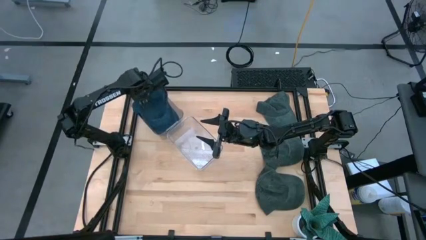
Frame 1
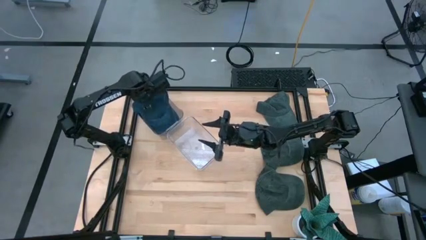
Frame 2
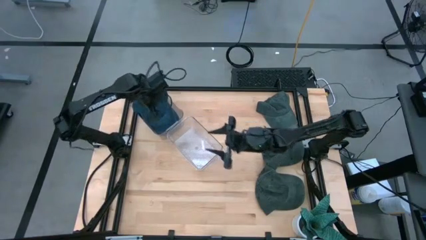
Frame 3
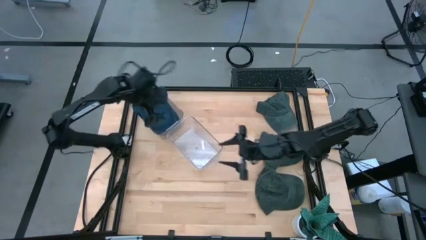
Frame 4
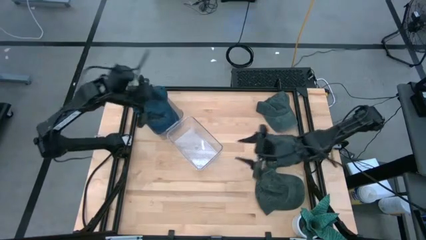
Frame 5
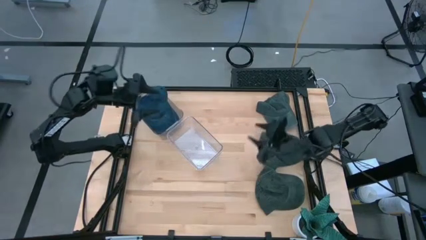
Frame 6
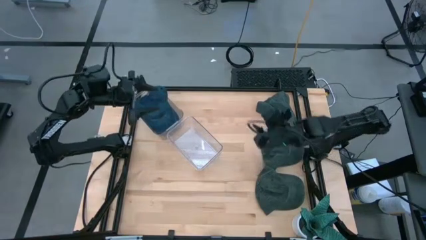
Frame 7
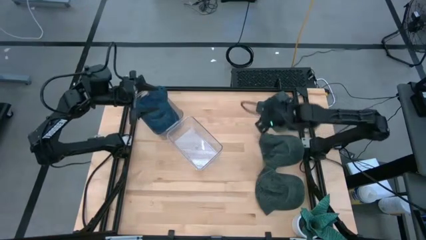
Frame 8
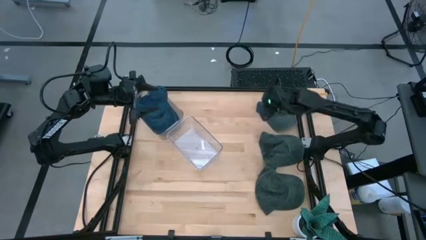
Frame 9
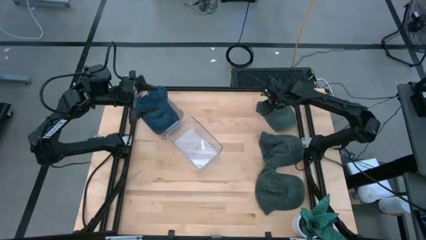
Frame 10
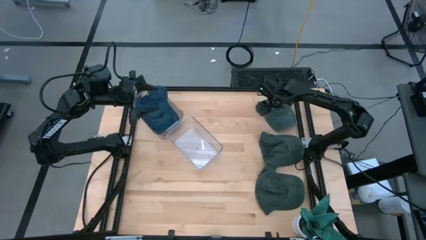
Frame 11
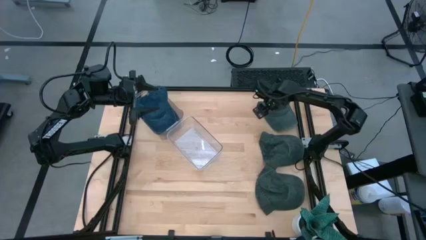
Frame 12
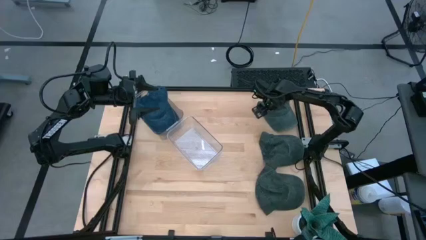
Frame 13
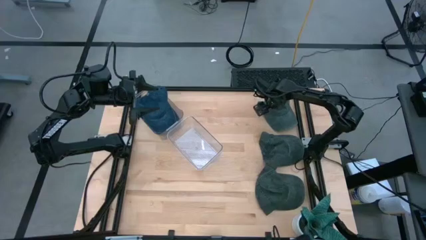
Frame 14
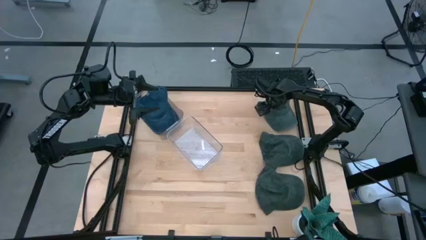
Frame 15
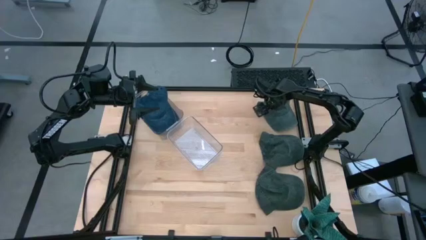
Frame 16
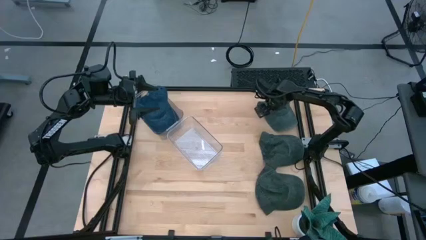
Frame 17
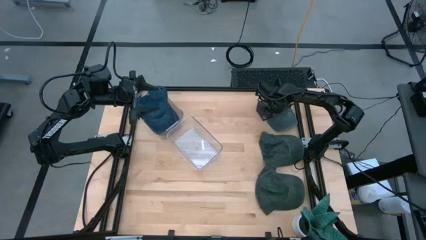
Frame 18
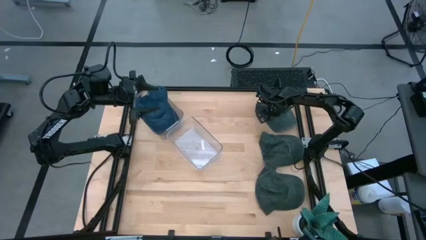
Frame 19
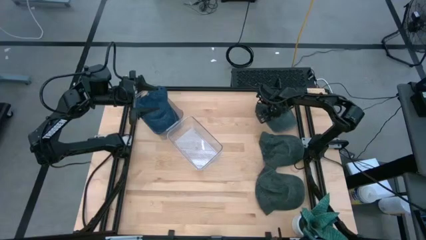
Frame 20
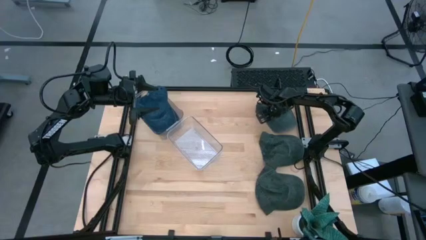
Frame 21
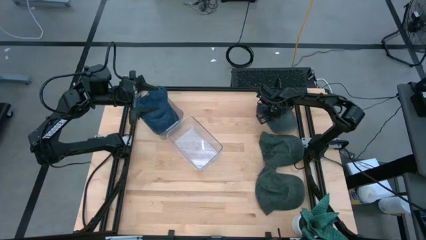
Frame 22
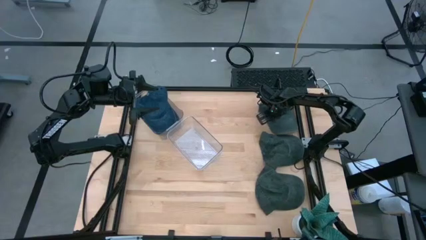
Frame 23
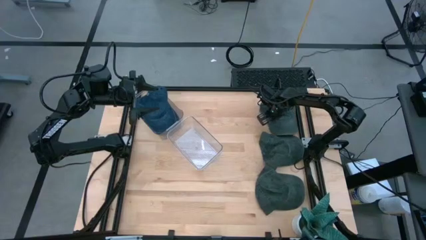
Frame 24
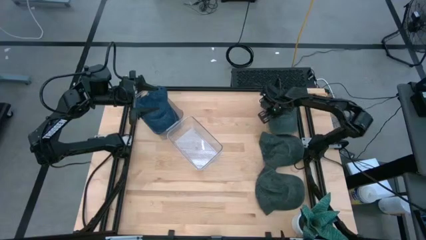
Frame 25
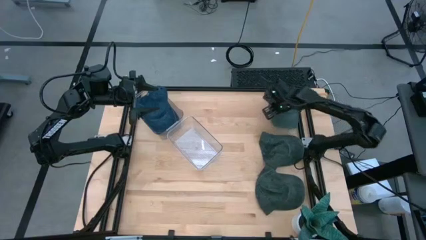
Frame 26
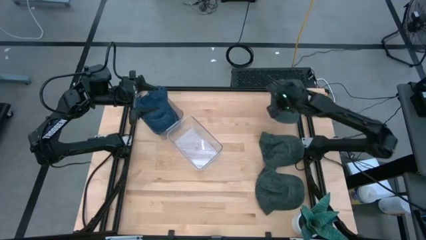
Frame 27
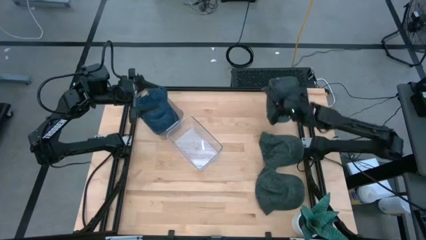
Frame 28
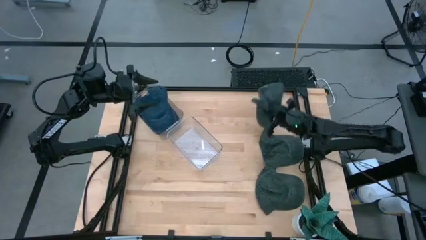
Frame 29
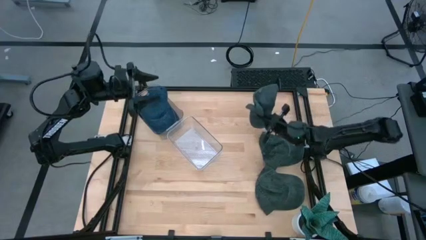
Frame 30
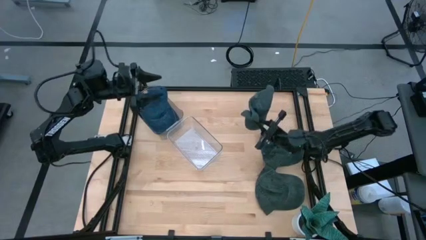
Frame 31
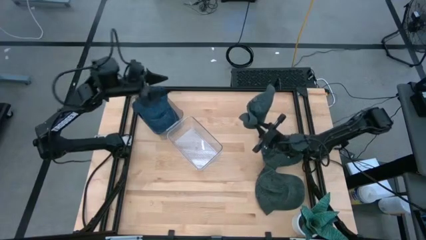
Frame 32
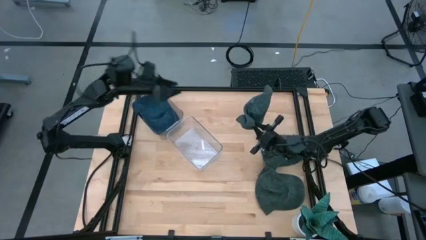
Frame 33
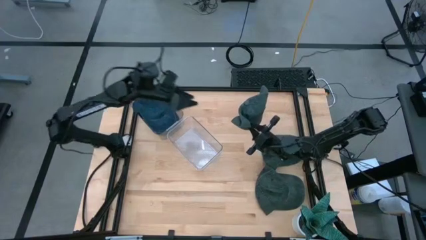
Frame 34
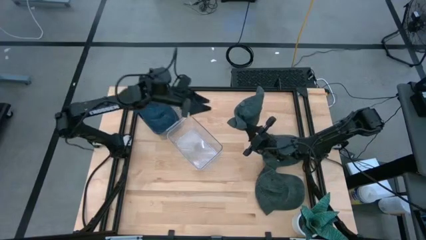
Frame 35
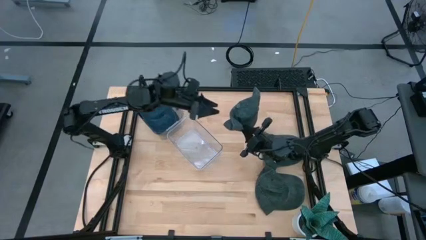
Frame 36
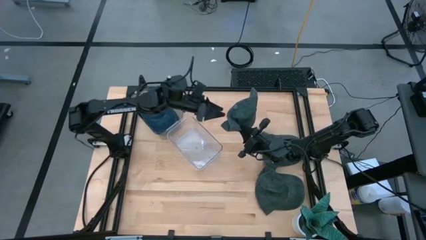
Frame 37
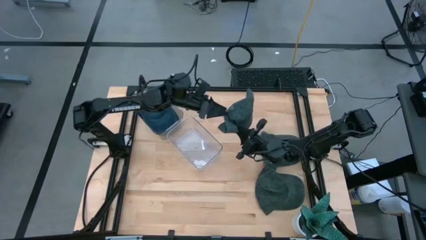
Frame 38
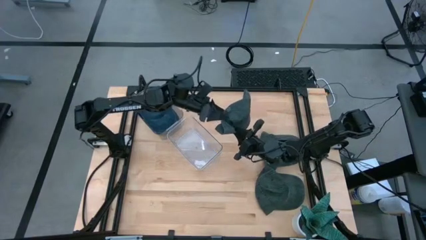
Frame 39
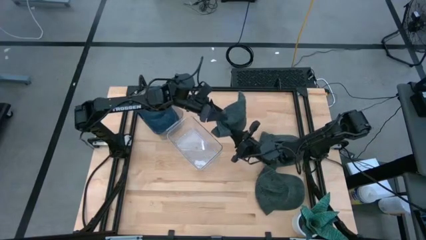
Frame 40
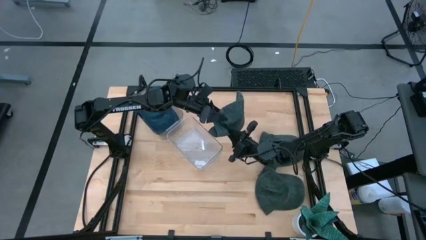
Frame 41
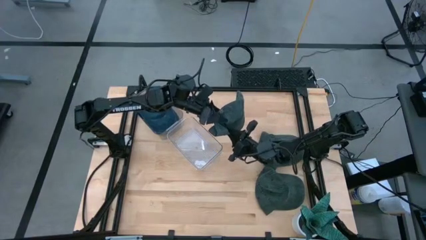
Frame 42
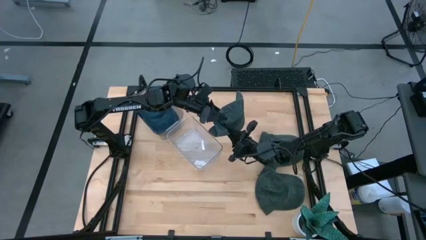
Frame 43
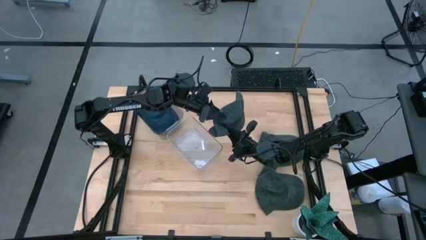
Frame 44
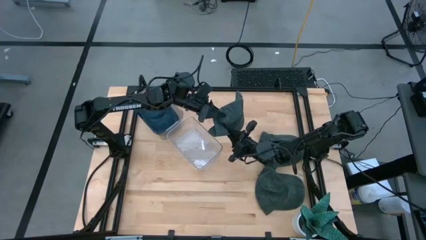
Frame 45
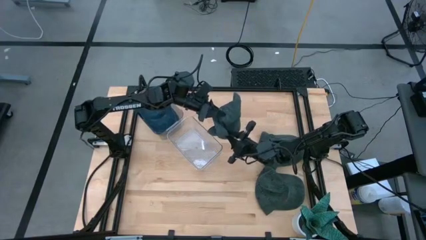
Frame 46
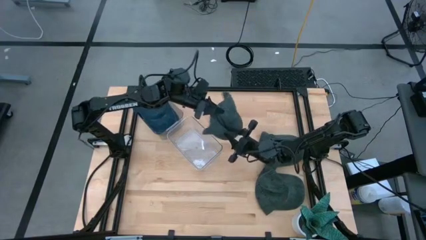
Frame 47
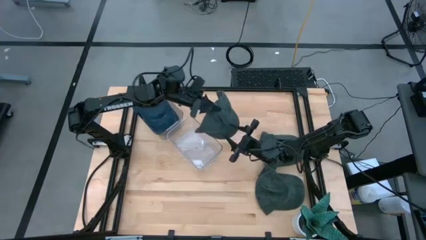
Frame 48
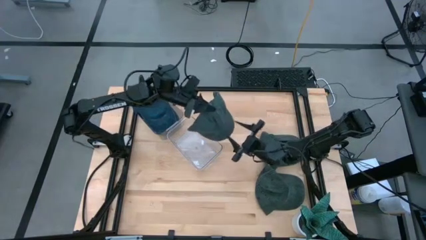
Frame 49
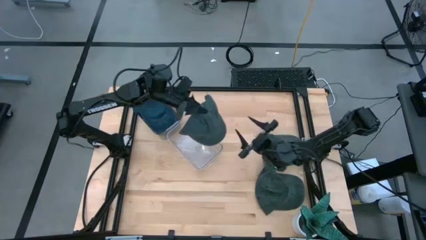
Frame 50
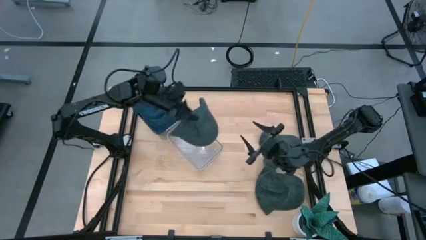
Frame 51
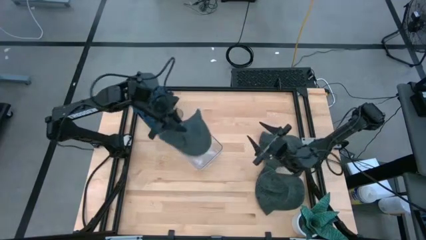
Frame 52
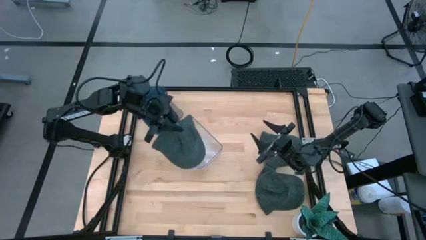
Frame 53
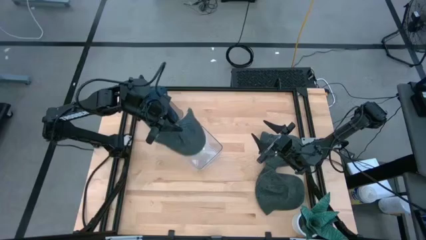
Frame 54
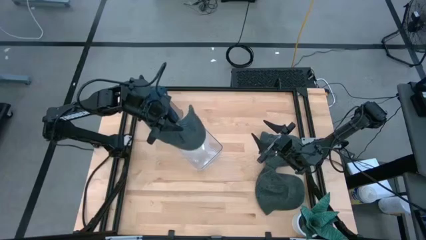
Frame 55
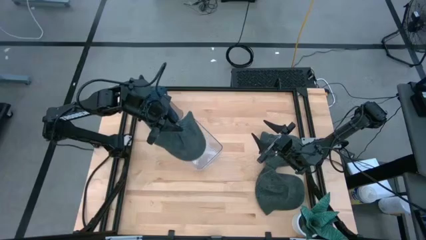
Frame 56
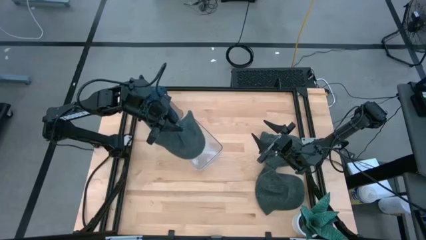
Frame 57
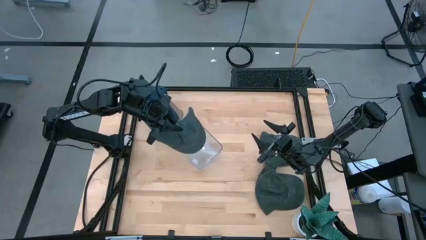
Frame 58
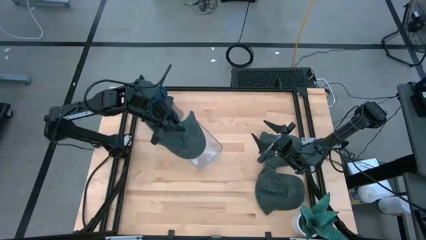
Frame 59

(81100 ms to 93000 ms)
Task: Pick & Place hat
Put the top black cap into the bottom transparent bin

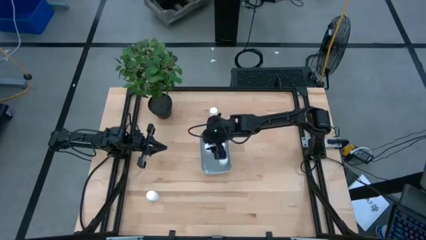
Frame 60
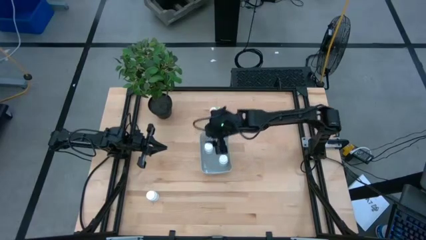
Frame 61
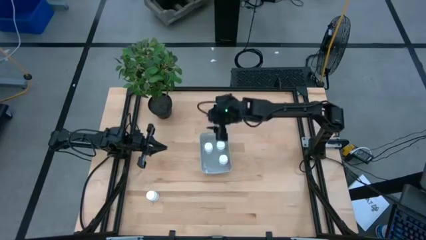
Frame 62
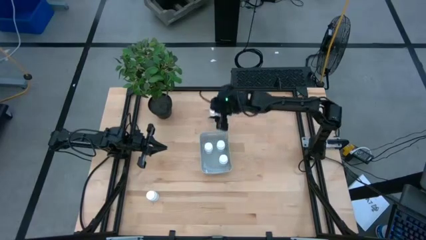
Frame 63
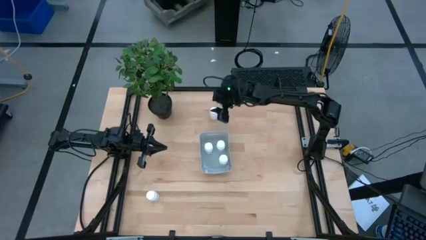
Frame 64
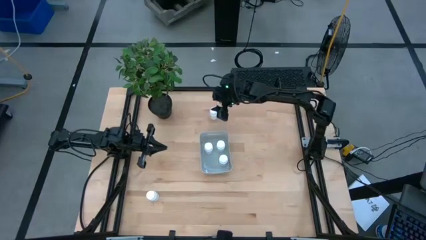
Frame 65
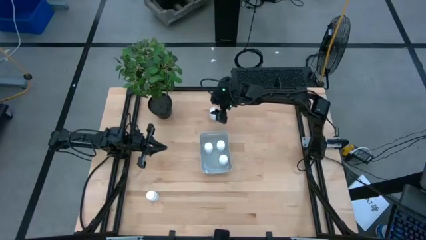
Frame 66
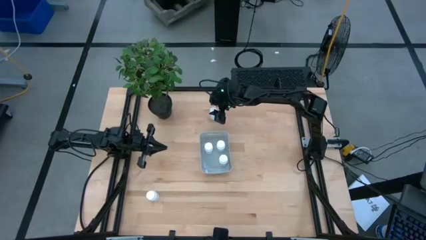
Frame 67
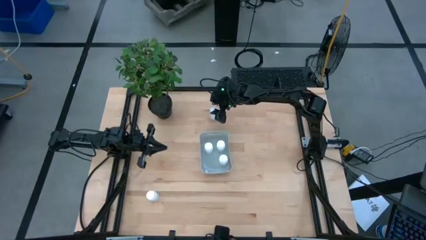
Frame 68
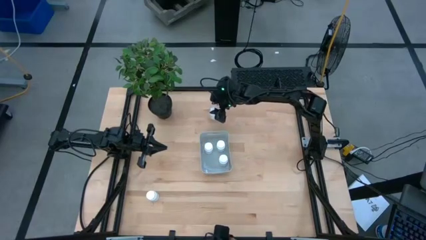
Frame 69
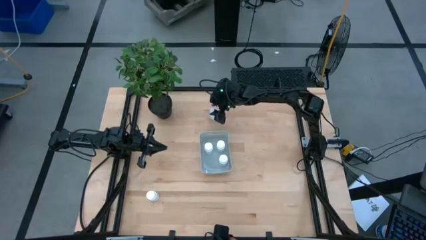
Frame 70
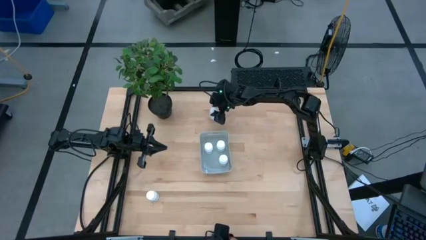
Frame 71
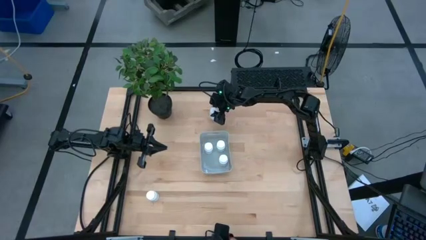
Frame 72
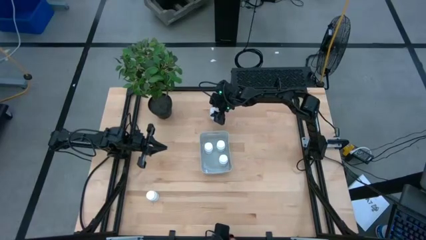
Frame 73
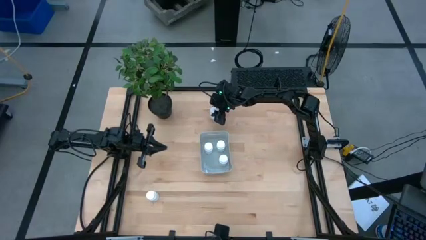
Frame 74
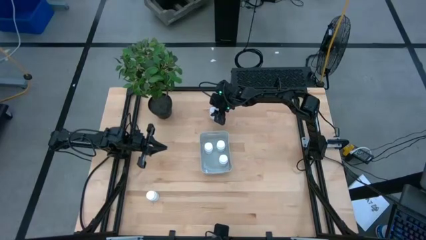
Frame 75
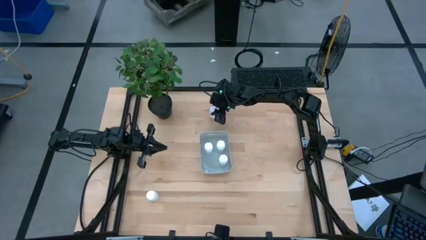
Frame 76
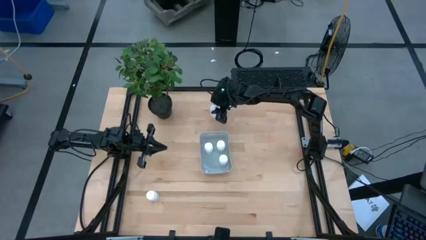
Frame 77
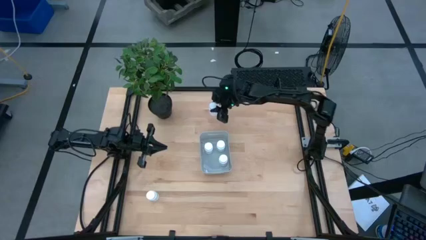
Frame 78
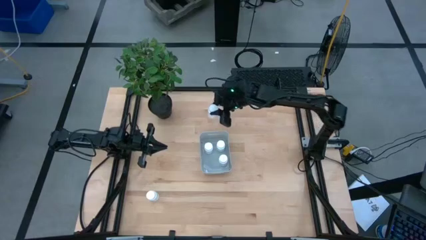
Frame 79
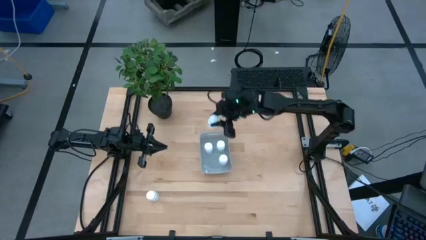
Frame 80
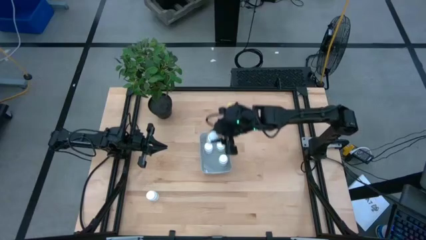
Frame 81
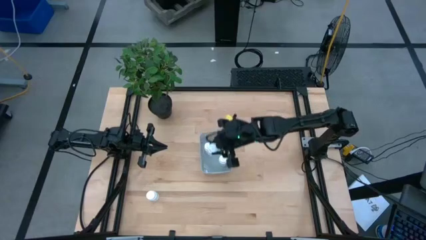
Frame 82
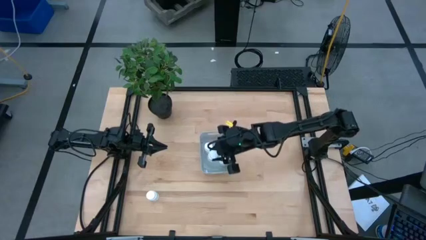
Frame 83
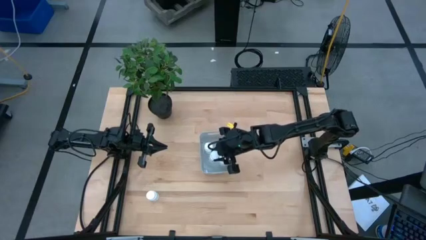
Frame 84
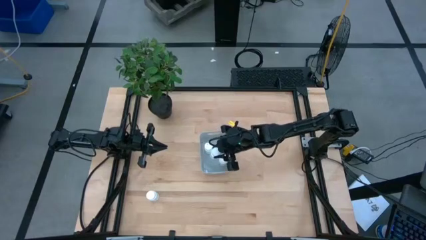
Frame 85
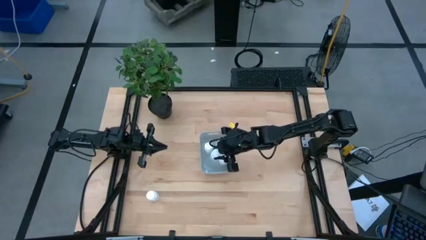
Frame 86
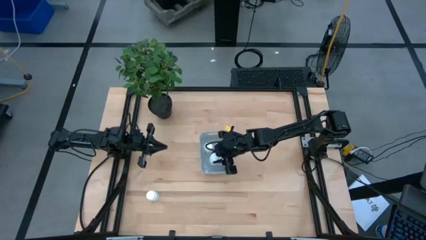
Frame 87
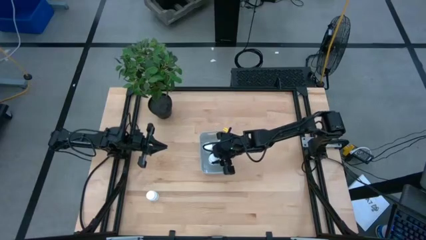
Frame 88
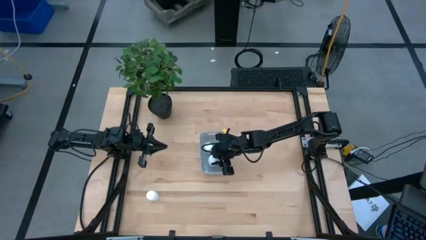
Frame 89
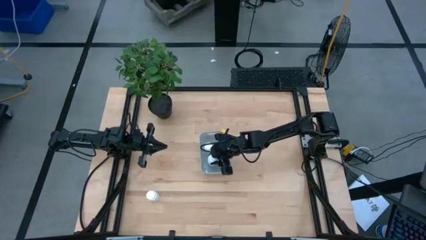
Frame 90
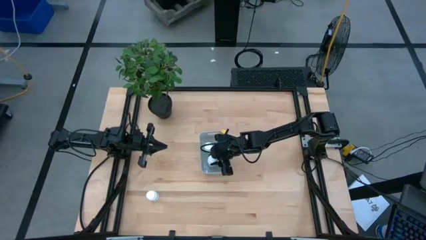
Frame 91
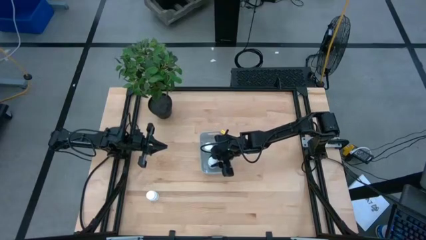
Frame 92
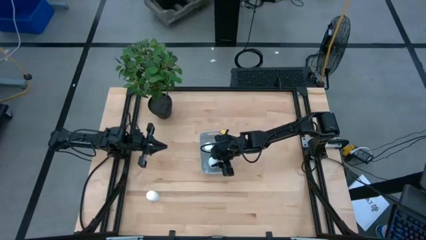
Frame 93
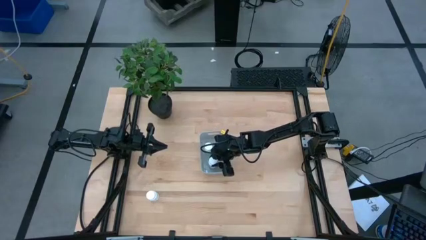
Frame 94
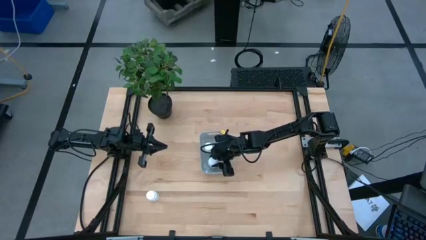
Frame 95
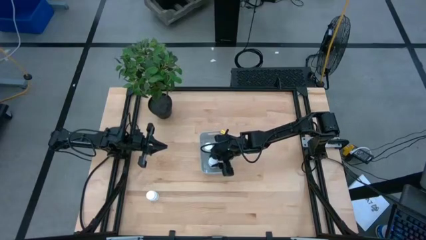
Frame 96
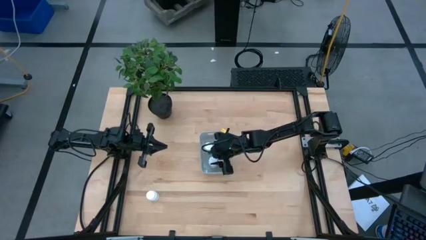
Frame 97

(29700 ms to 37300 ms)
Task: Pick and place pill bottles into a basket
Put the white medicine bottle into the gray bin
